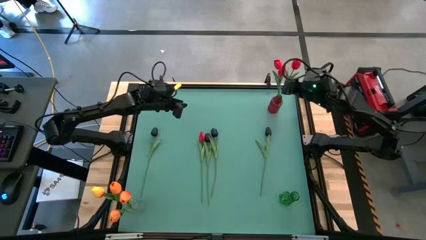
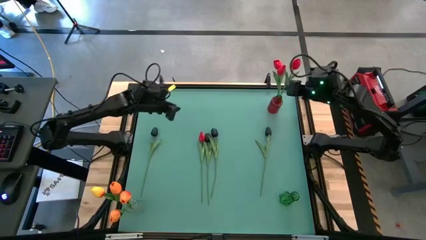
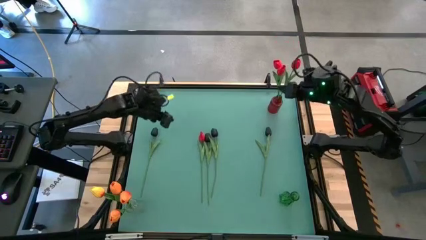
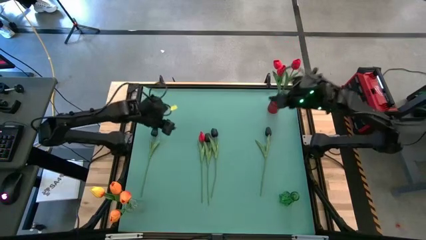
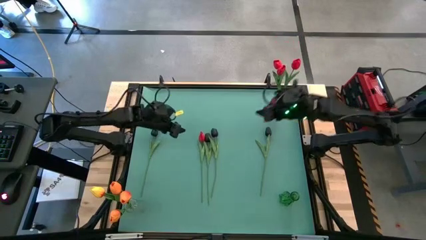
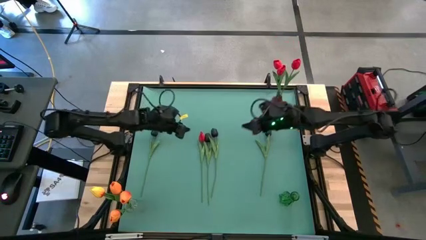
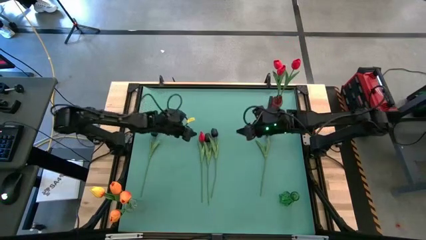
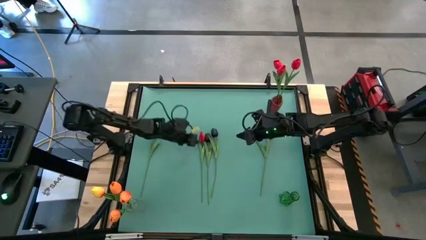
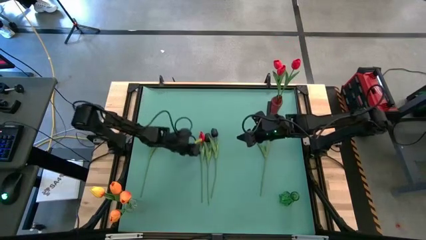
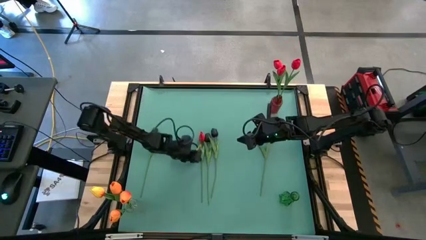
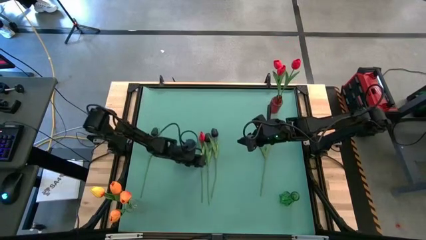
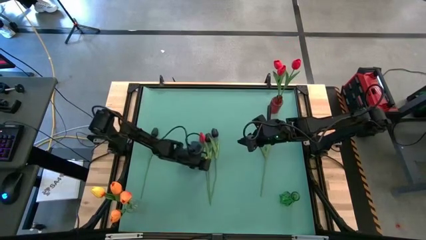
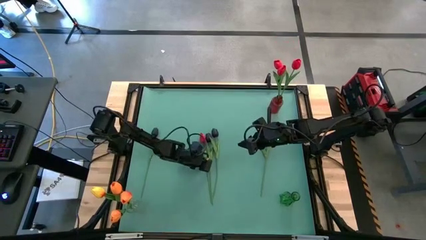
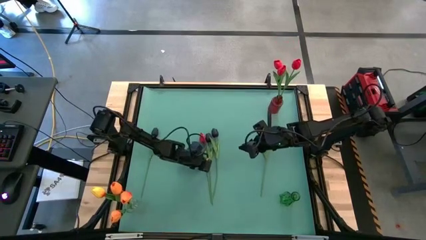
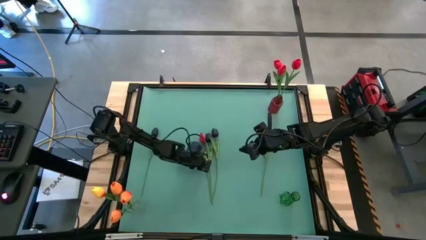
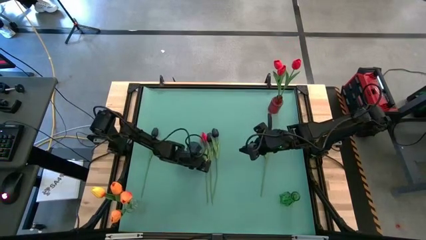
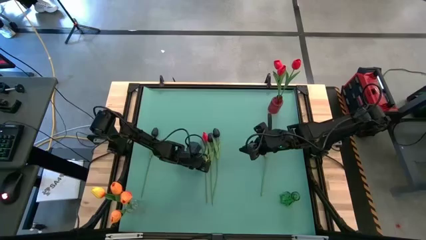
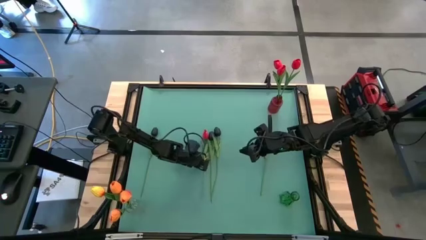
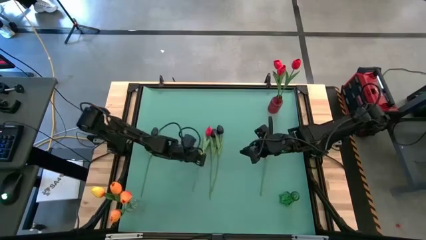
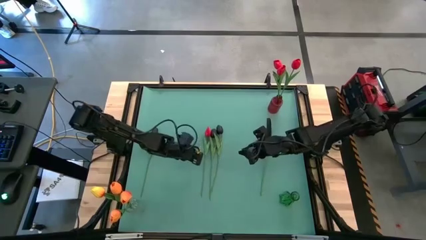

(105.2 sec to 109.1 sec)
Task: Sort flowers into vase by color
Put the red tulip into the red vase

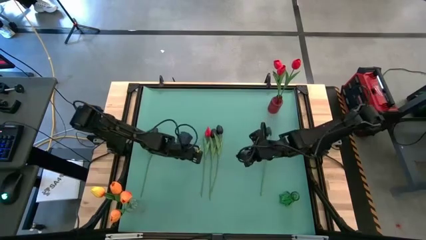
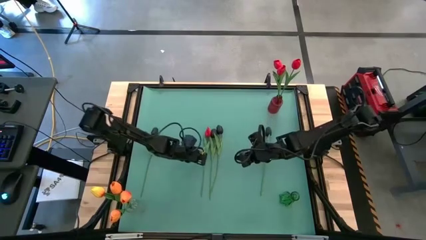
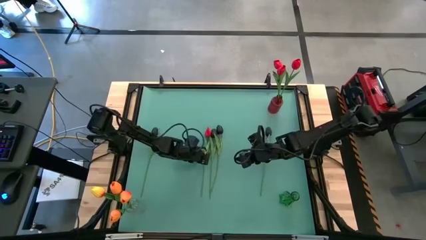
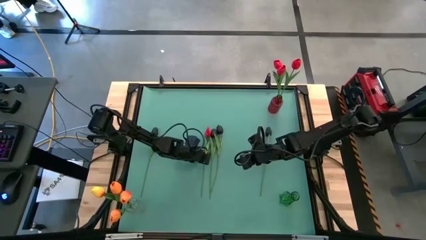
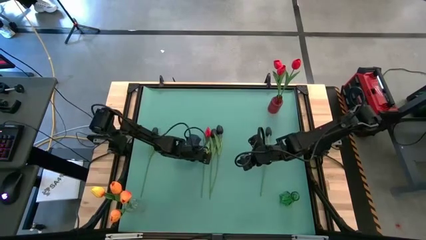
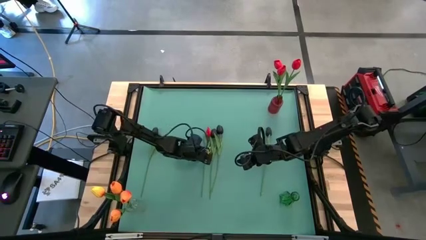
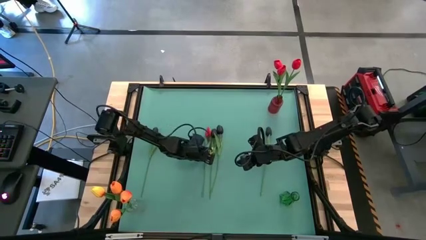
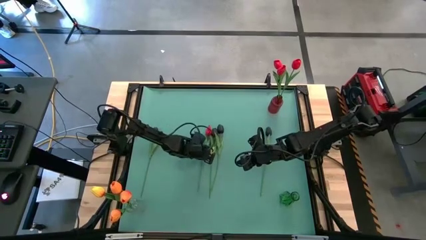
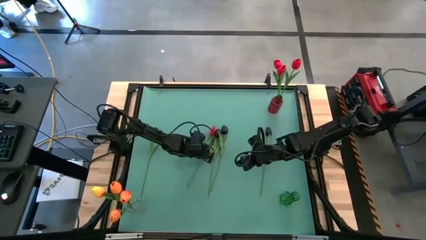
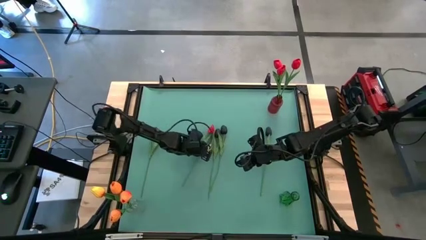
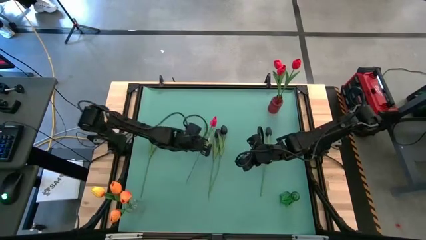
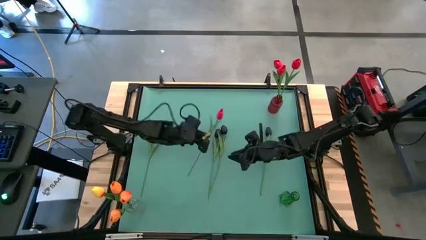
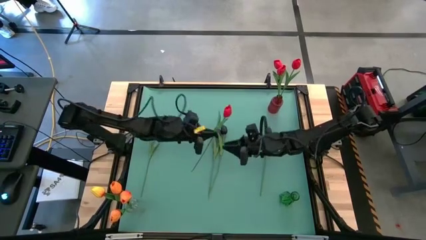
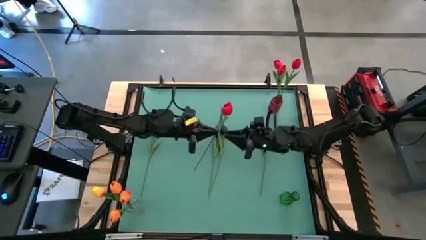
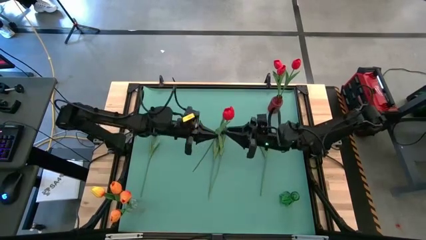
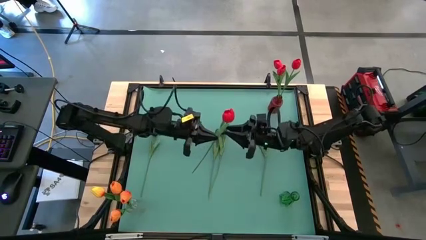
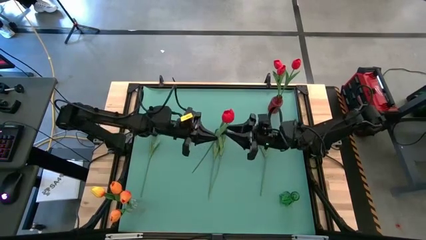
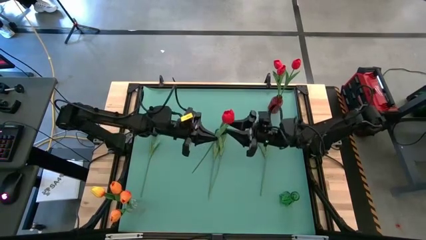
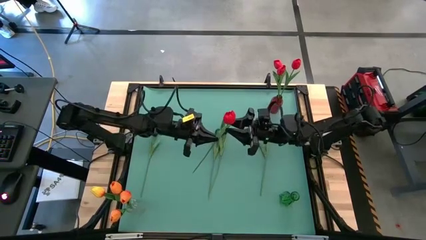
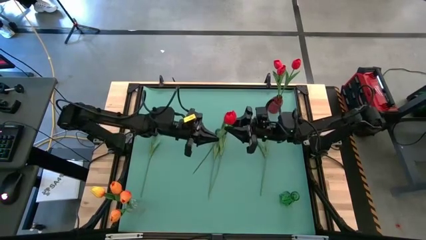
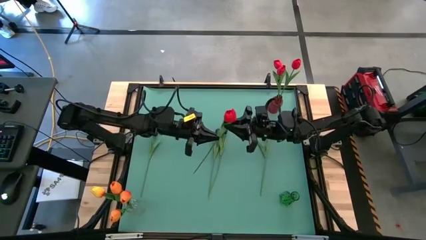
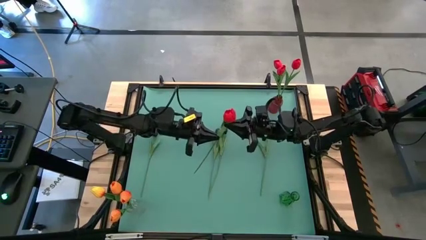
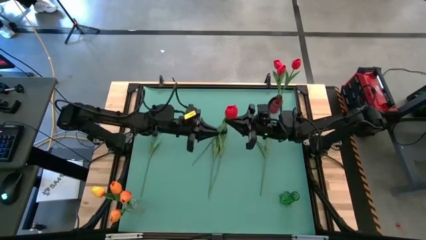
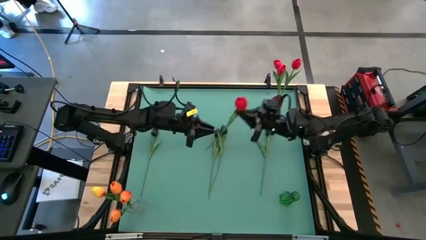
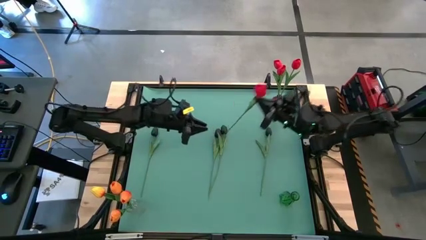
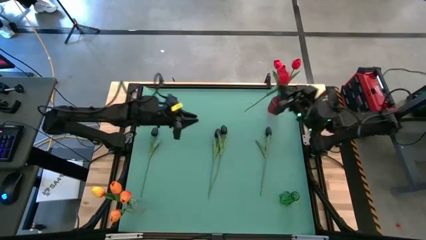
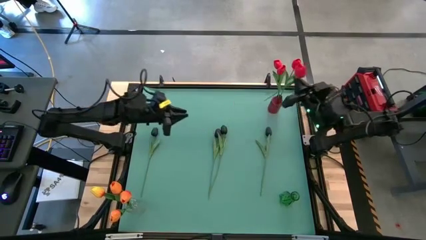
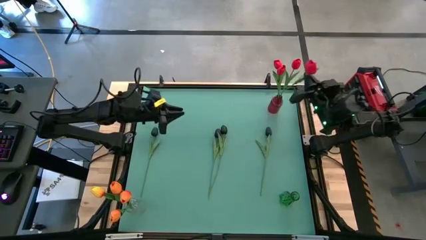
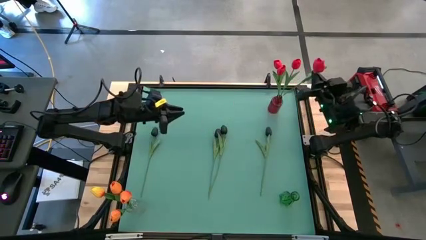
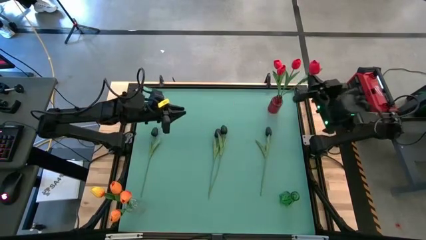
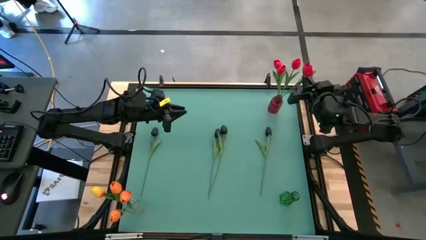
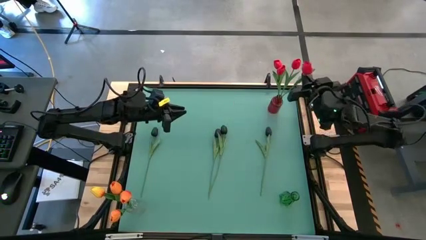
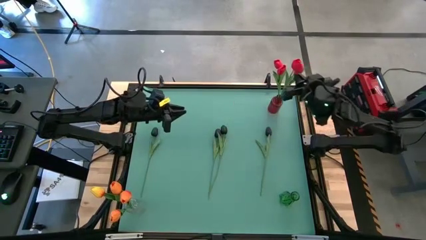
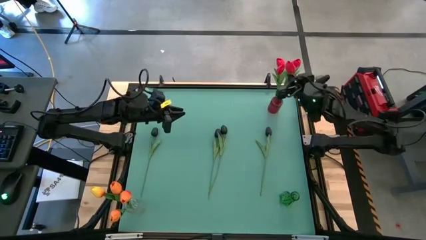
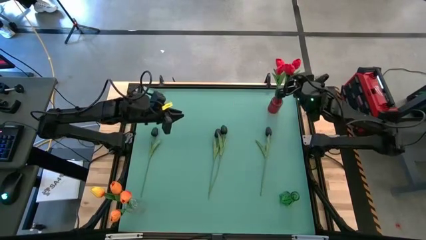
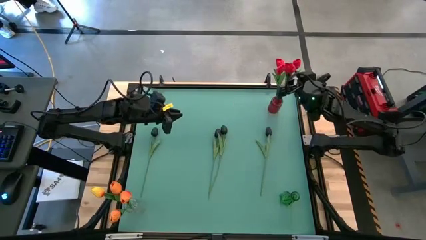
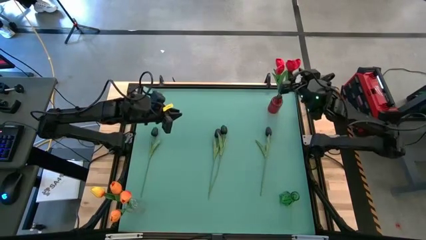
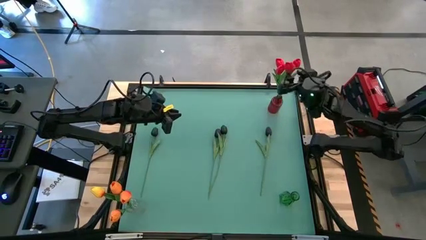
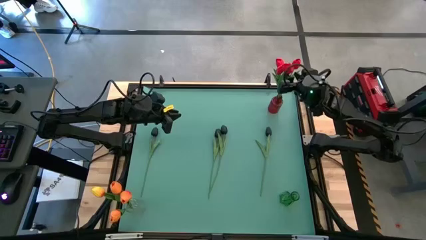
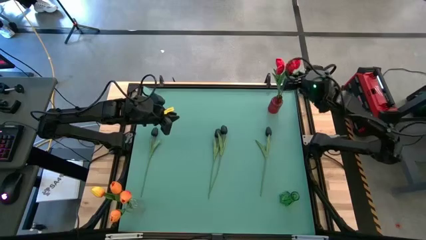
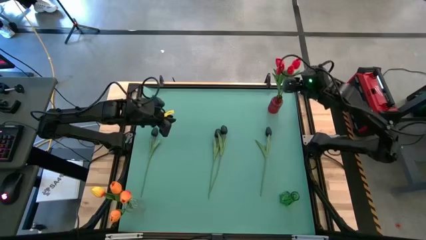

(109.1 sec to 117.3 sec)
Put the red tulip into the red vase

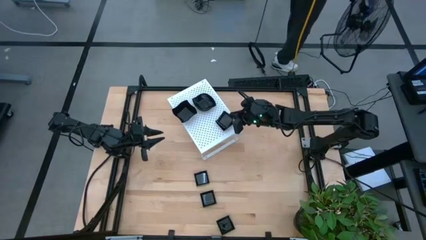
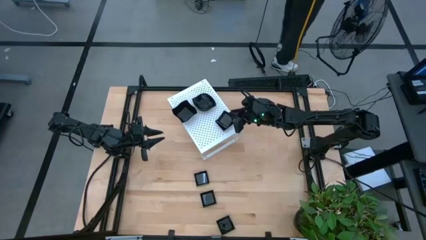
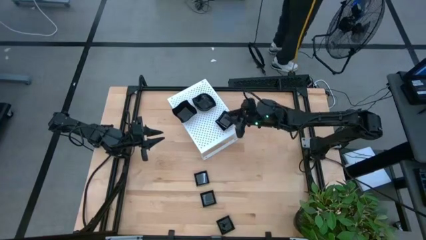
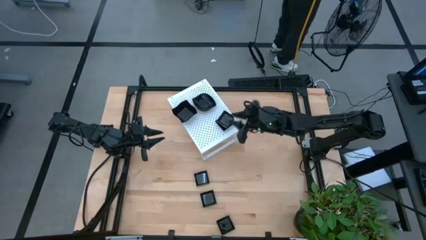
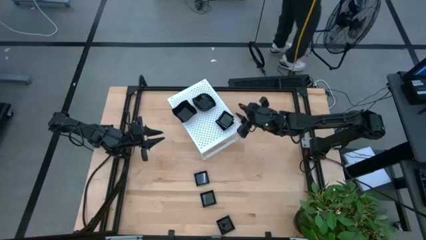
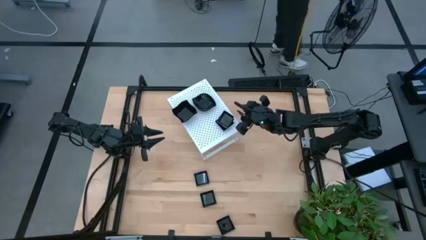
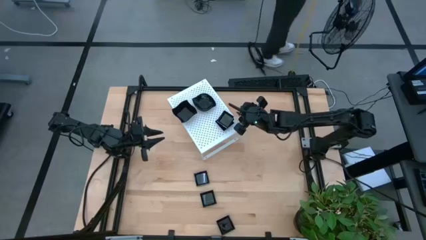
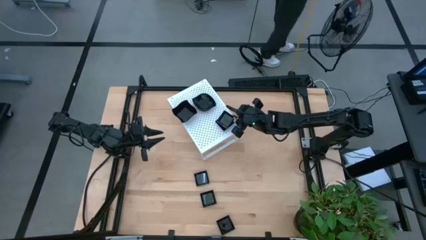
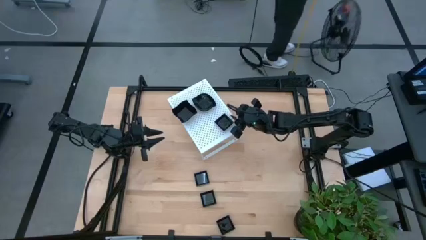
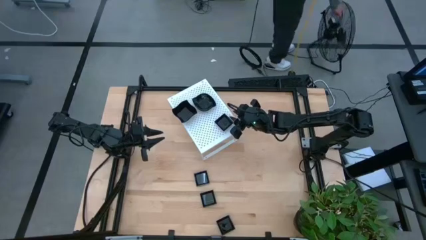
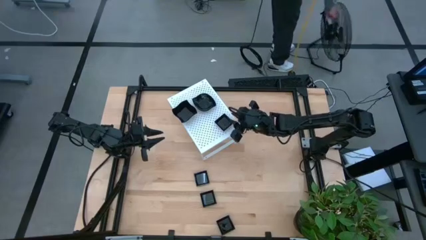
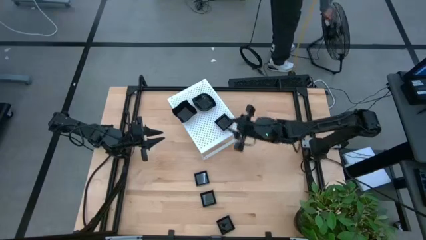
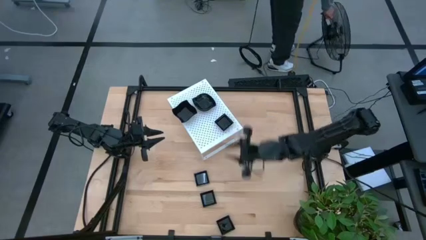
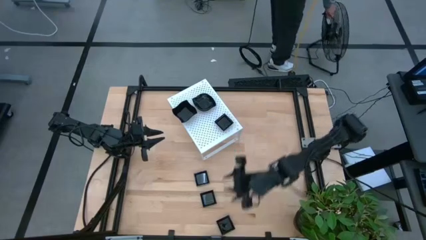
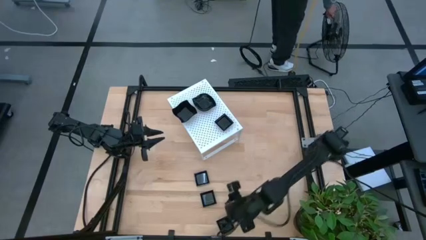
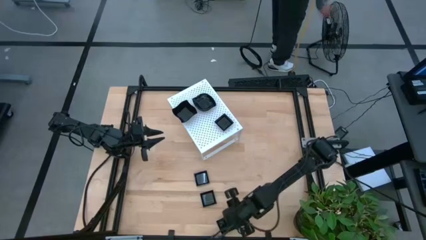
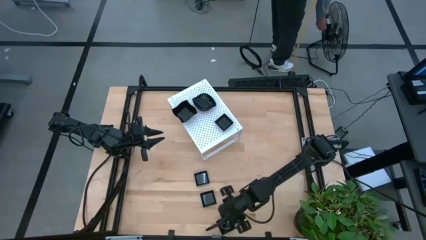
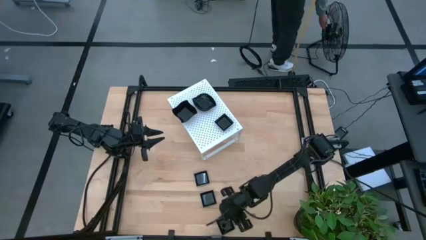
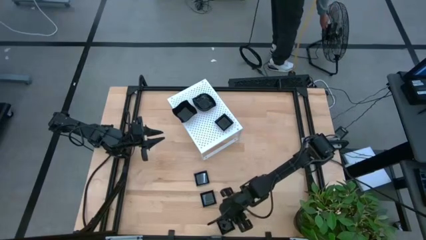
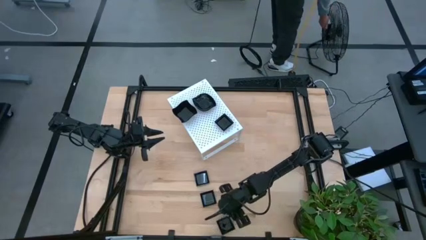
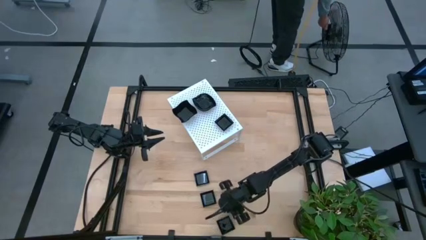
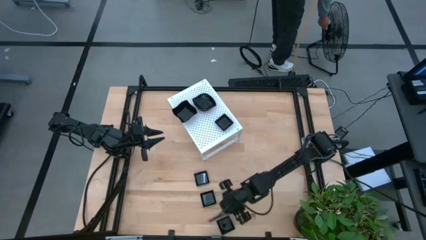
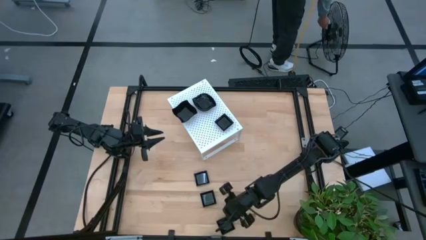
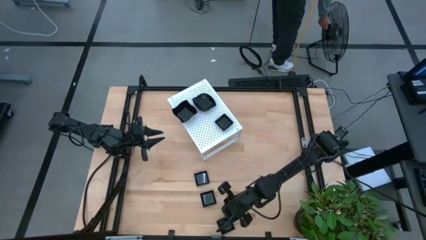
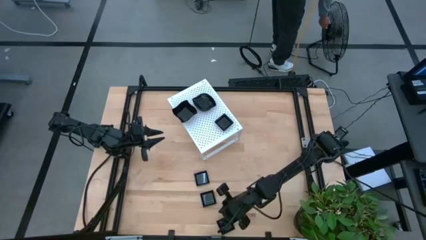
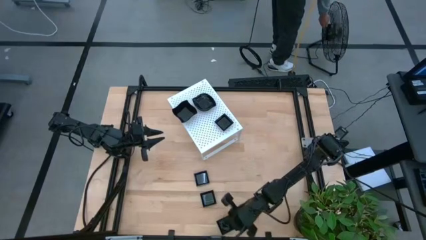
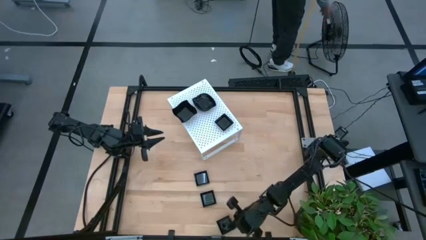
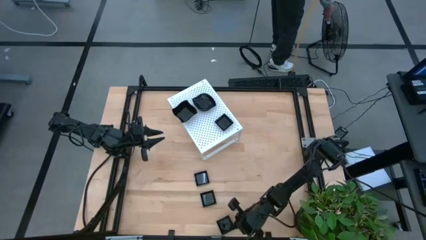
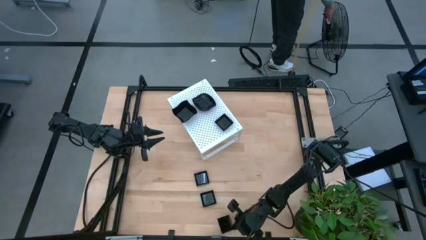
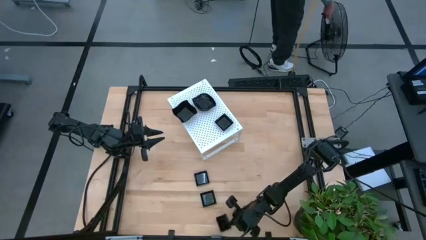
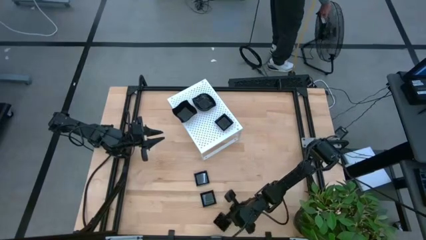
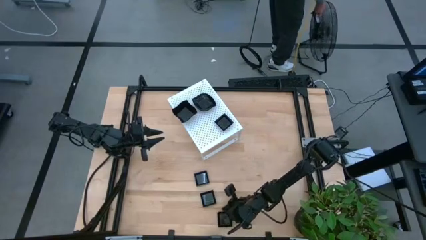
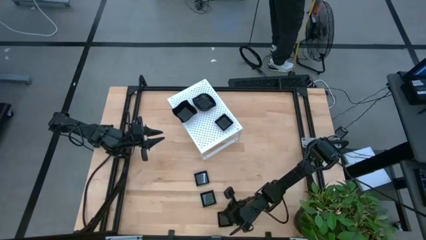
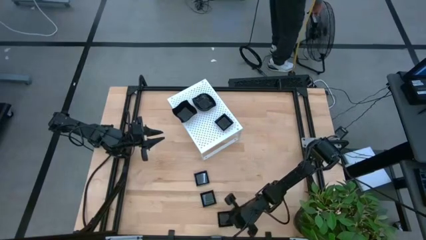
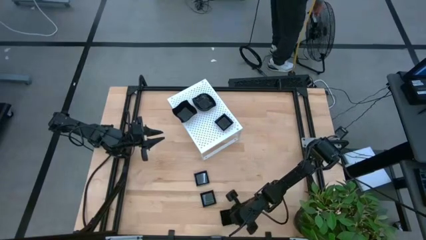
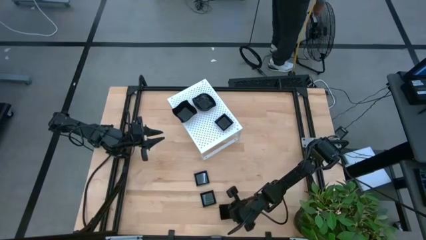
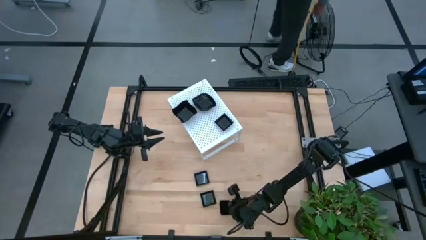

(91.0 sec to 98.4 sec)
Task: Pick & Place Mini shaped plates
Adjust the square plate
